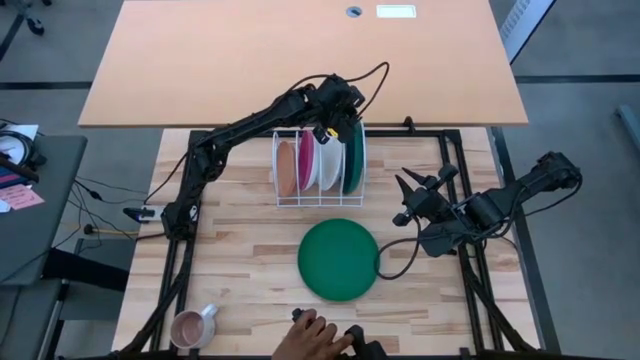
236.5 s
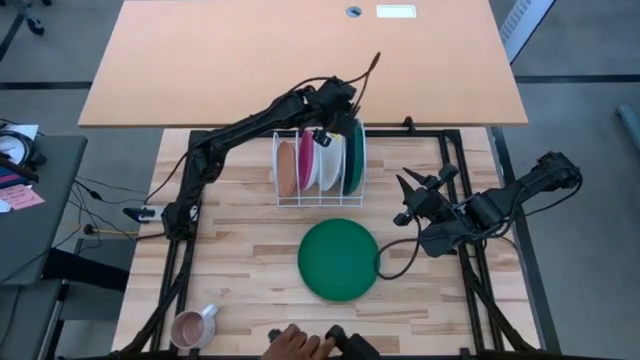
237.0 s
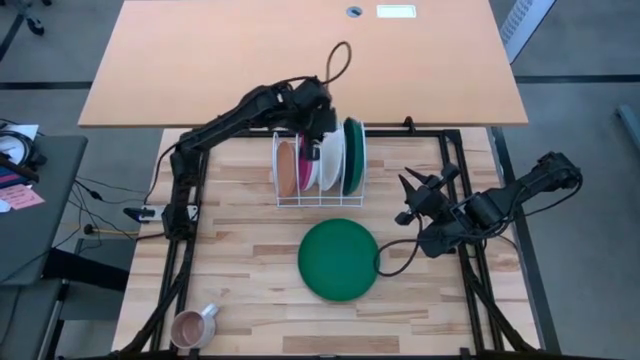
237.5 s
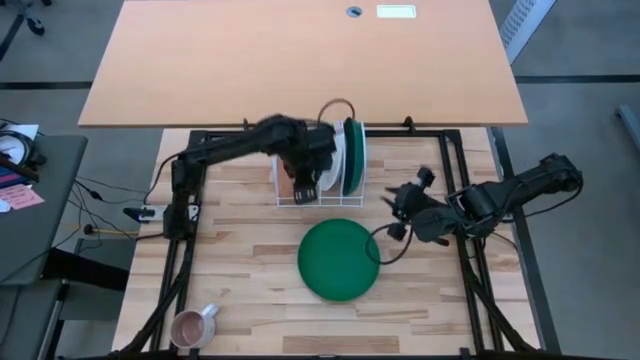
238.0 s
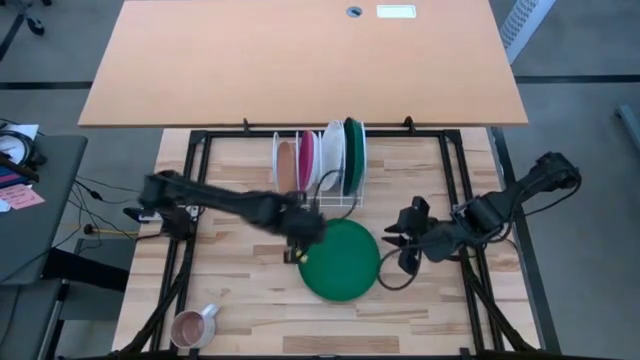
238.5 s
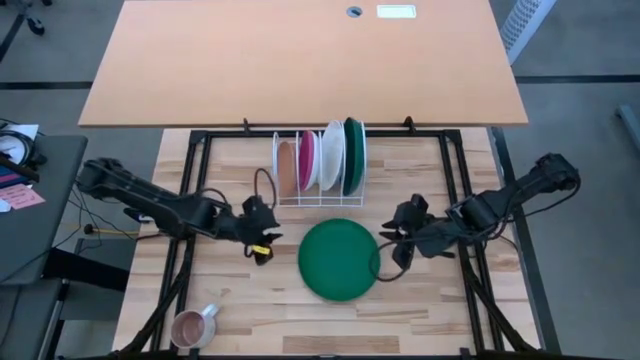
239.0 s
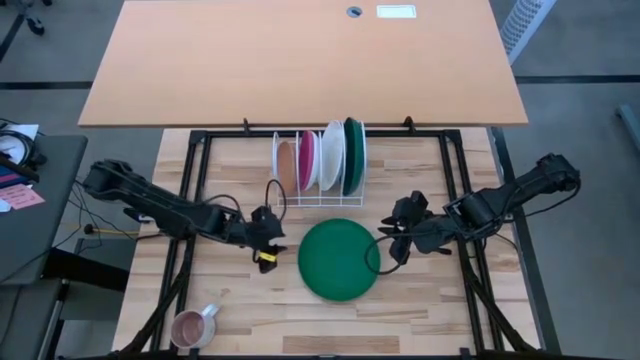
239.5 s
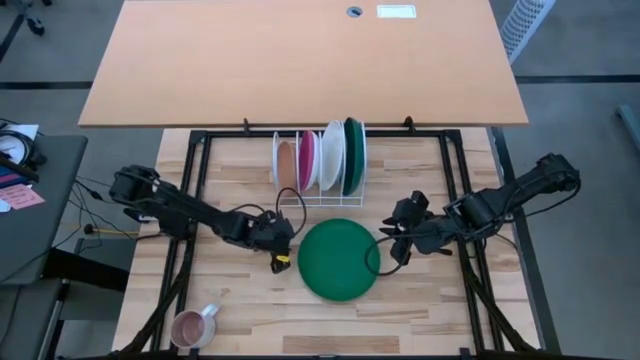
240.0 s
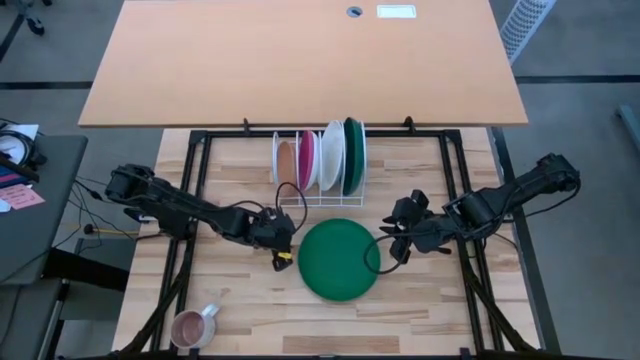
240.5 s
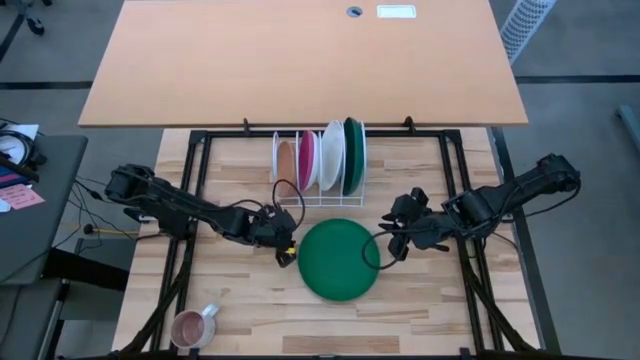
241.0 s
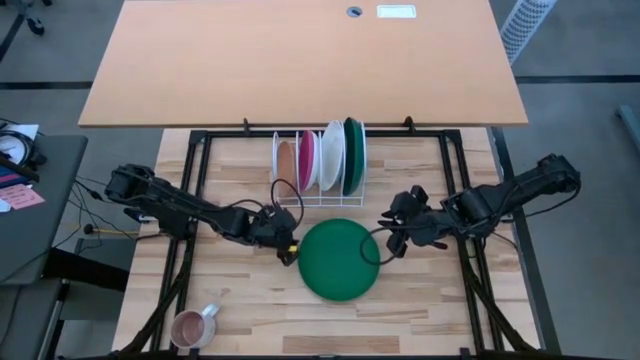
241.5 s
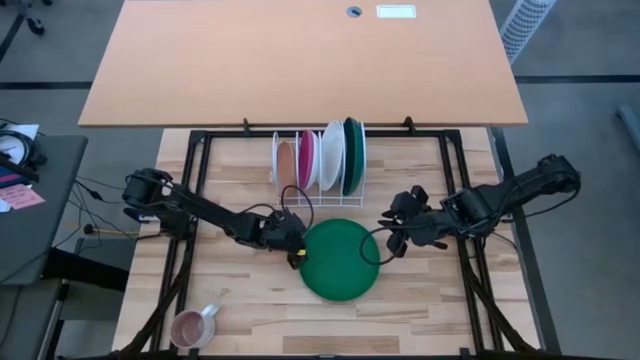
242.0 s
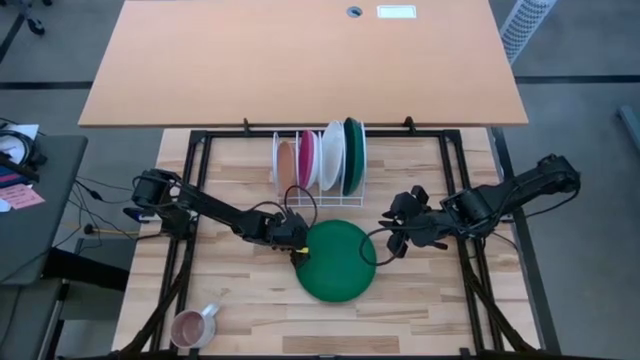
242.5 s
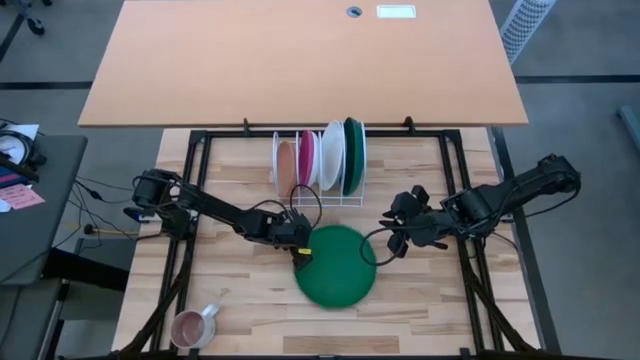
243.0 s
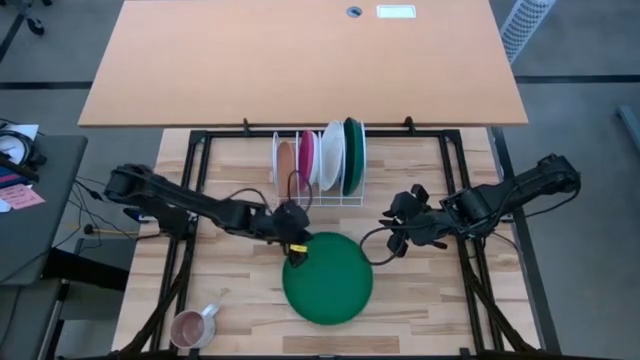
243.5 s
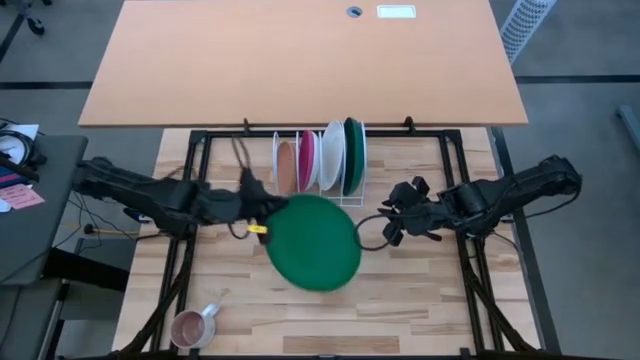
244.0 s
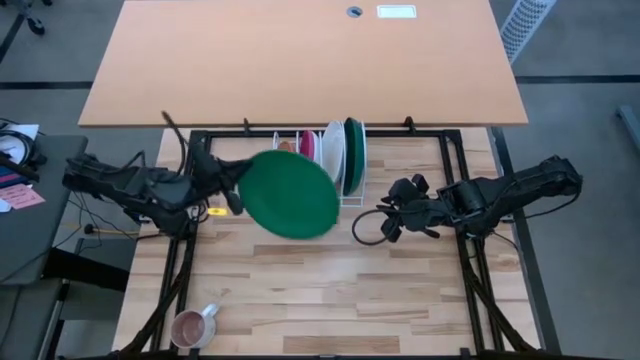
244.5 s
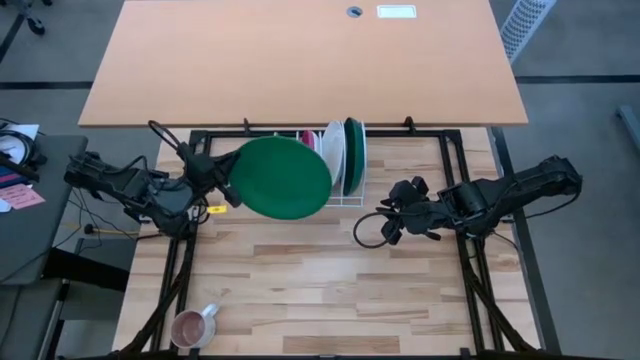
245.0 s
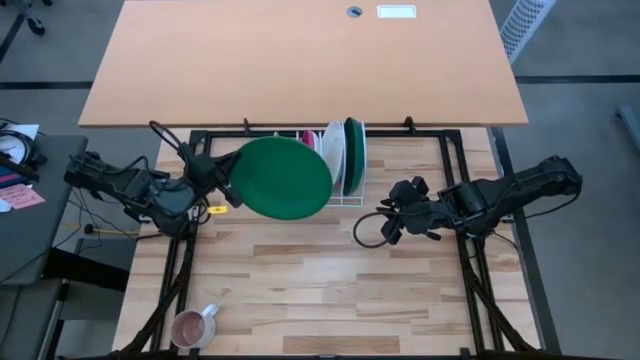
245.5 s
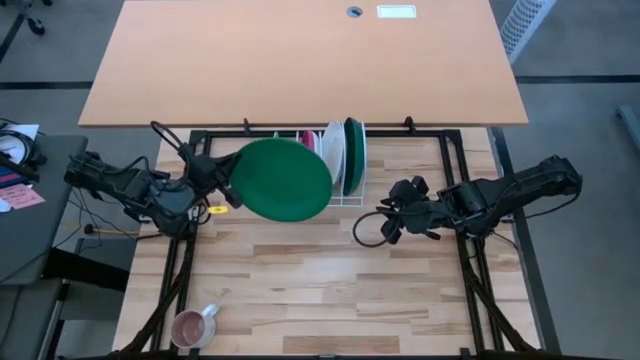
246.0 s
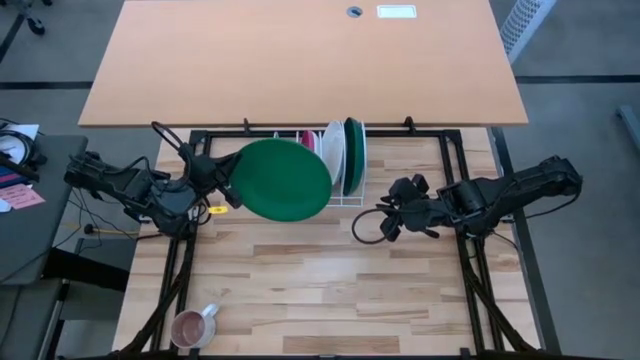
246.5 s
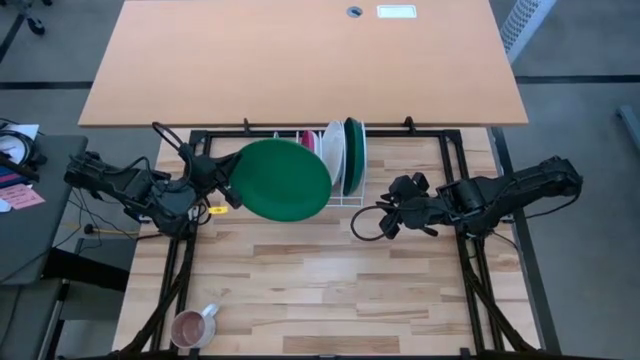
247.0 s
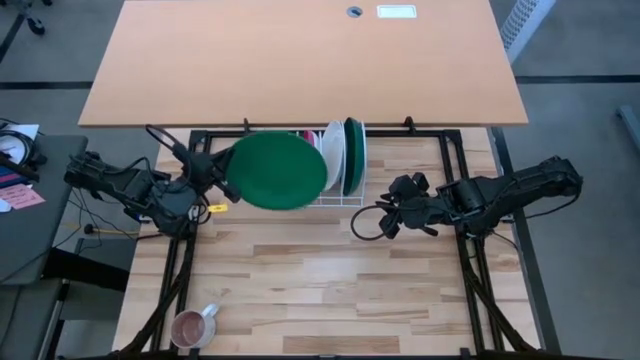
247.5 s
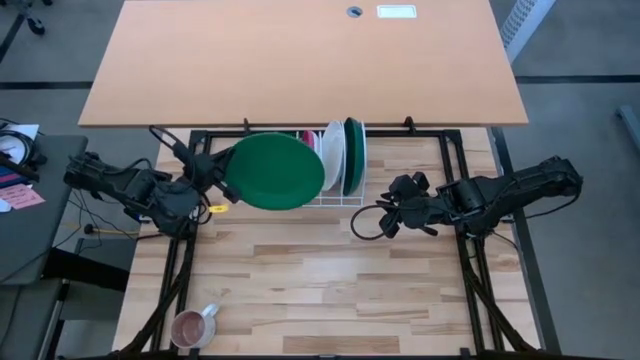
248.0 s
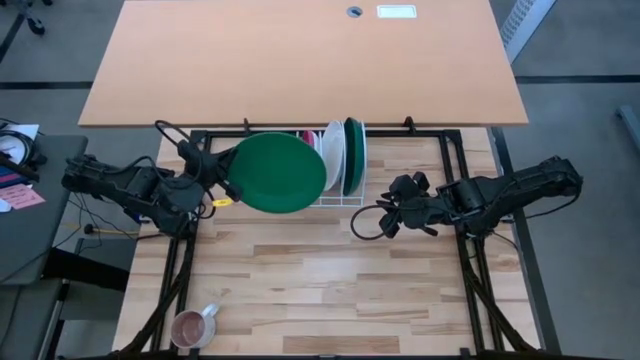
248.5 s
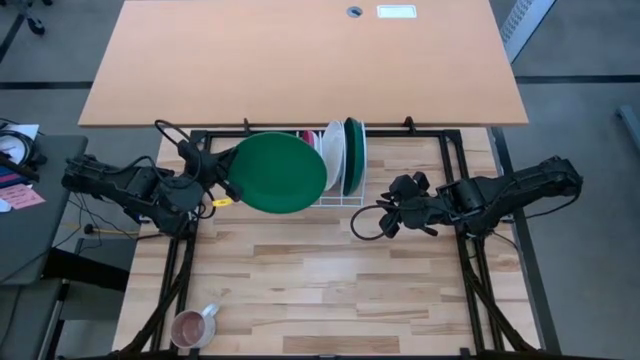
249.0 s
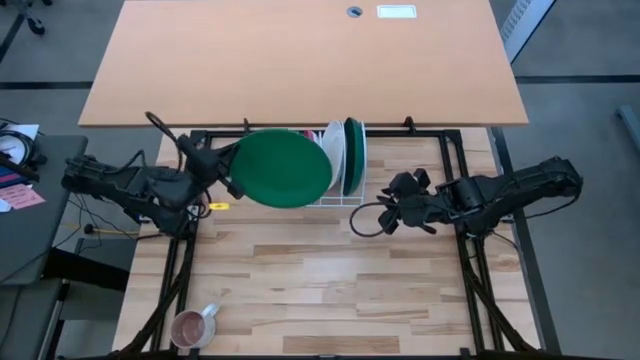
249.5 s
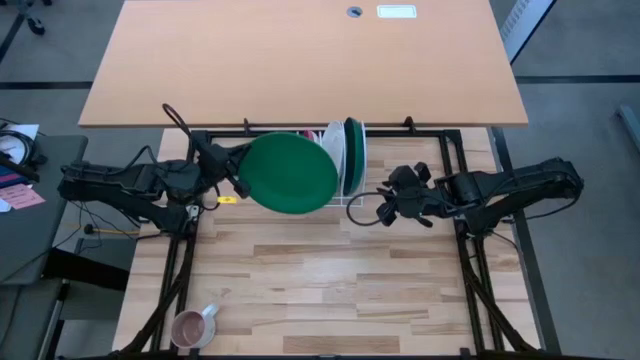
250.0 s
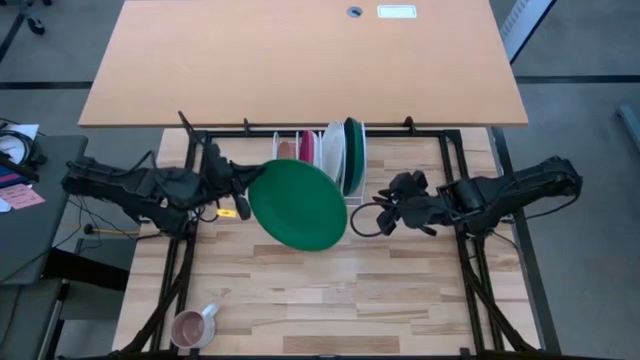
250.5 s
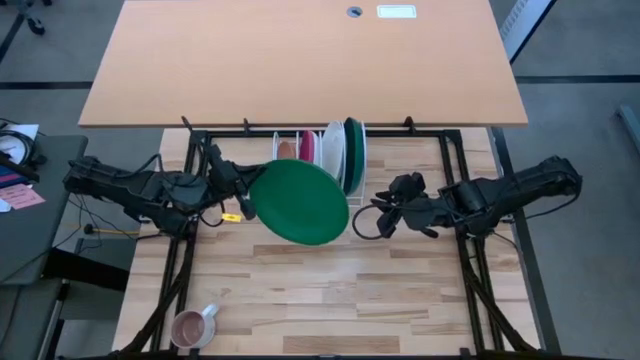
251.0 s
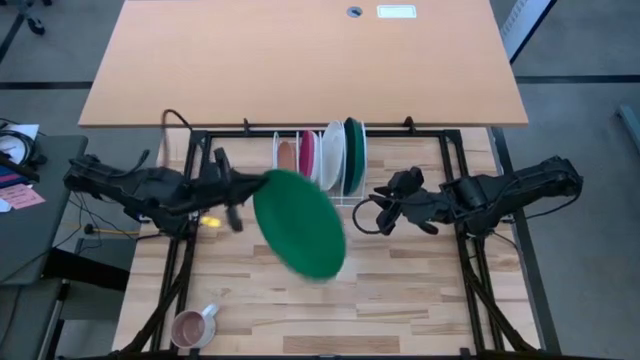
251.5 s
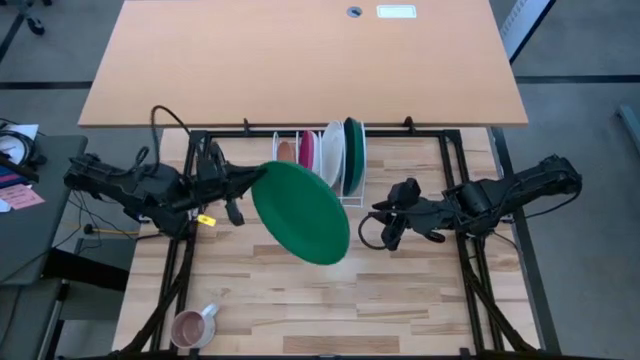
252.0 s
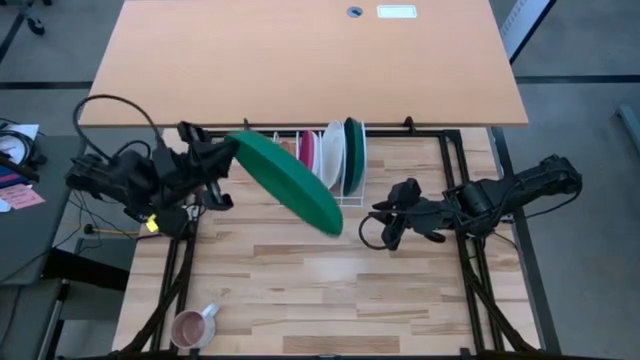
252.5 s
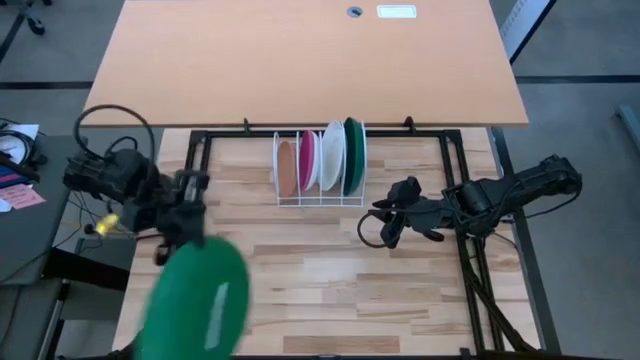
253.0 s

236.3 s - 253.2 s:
Task: Sort dishes
Put the green plate in the dish rack

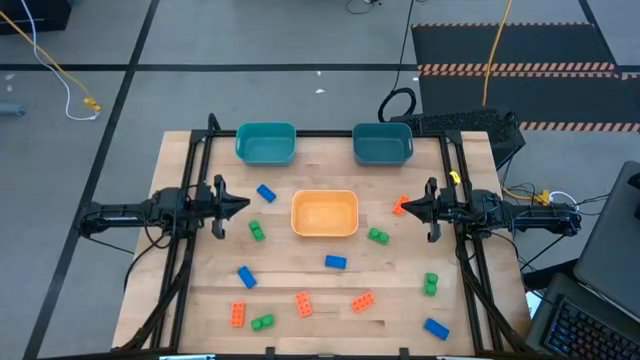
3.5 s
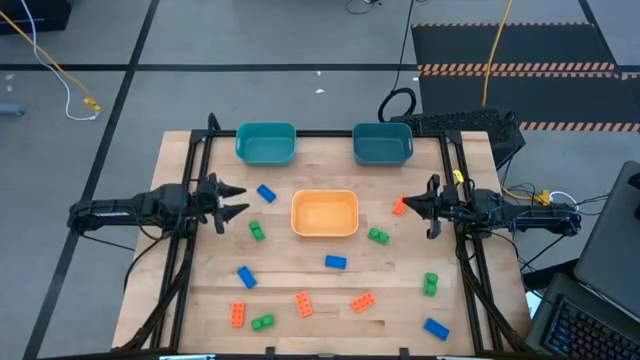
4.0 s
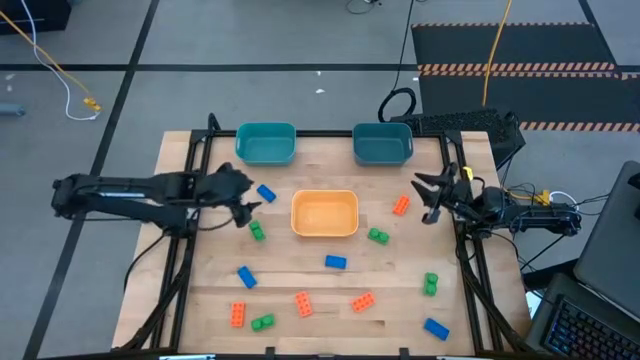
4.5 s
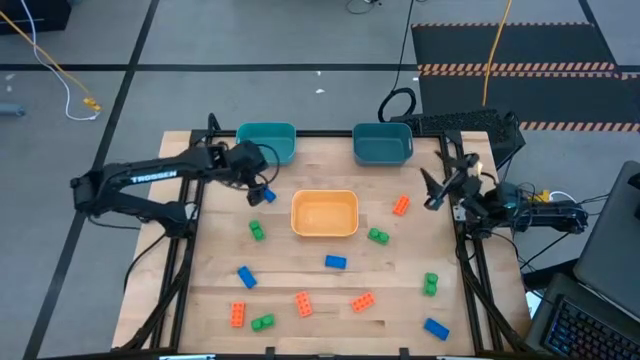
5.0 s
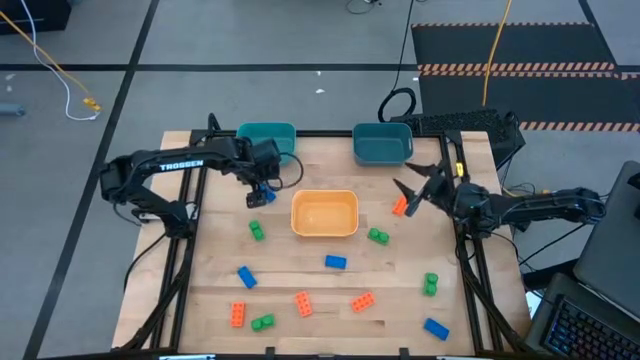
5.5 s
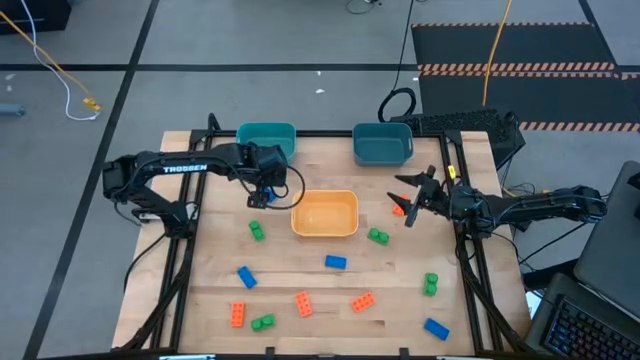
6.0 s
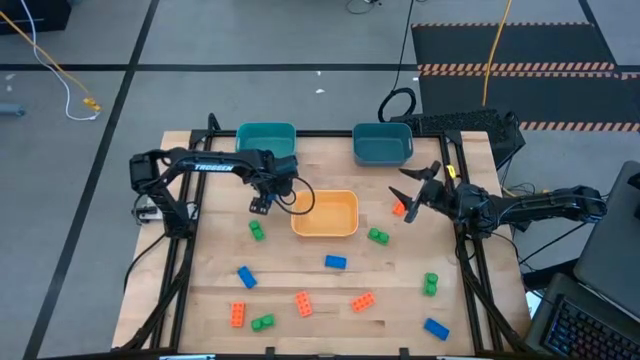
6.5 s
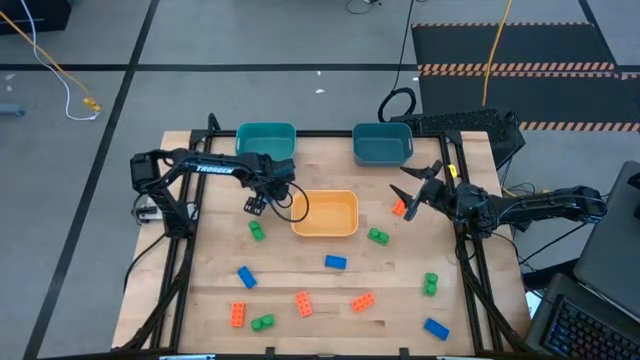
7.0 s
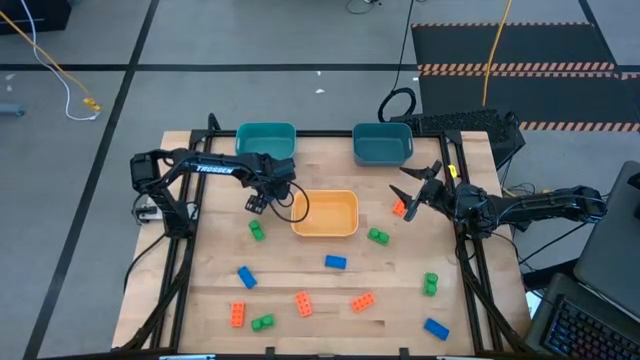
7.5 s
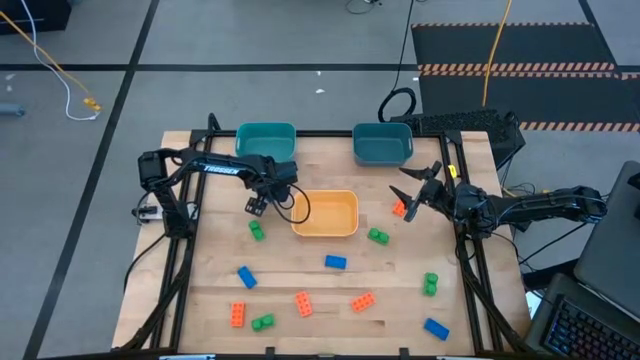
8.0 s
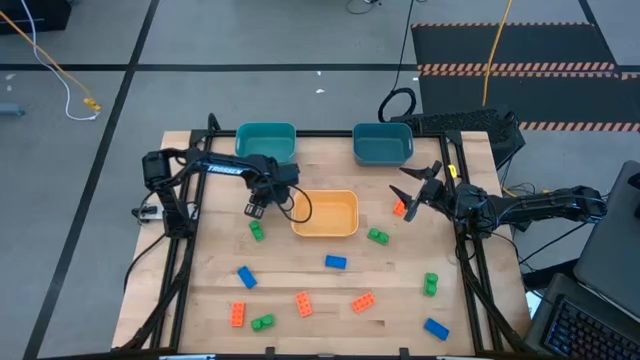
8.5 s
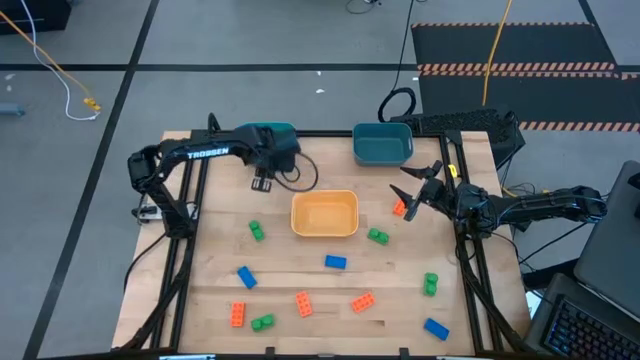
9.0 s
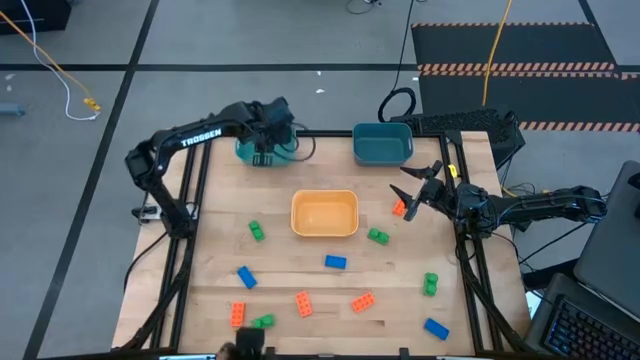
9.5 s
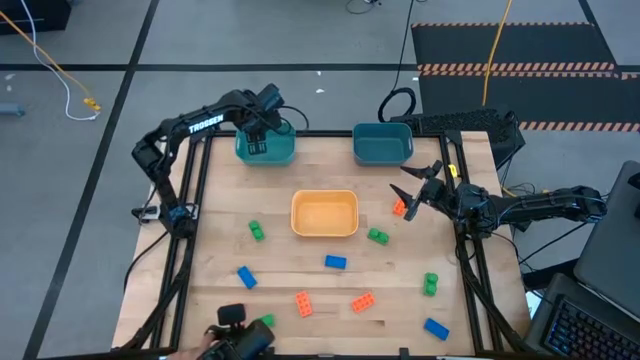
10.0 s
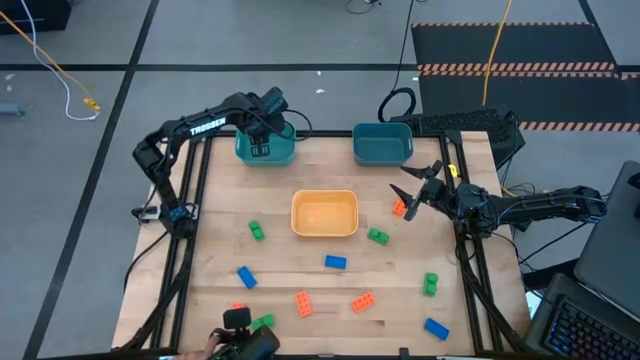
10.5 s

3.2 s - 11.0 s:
Task: Sort & place blocks by color
Put the blue game piece into the green bin
